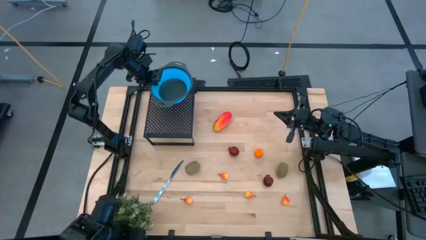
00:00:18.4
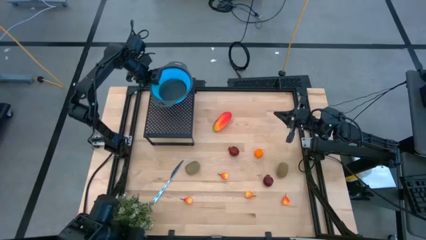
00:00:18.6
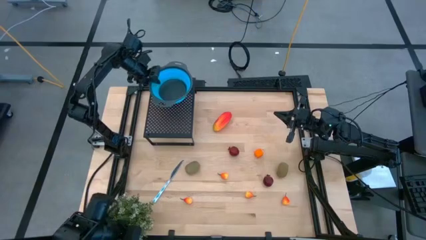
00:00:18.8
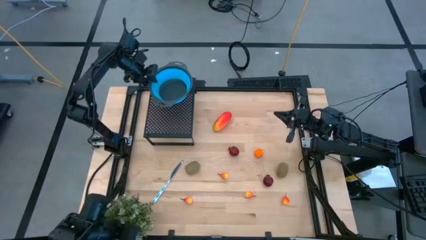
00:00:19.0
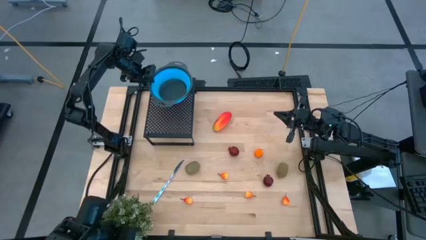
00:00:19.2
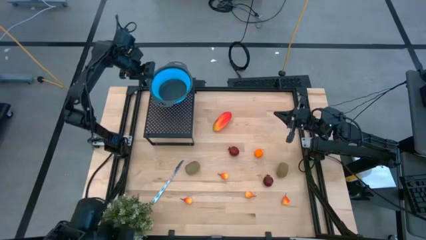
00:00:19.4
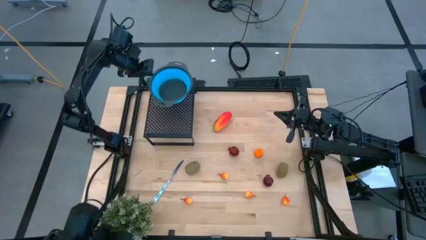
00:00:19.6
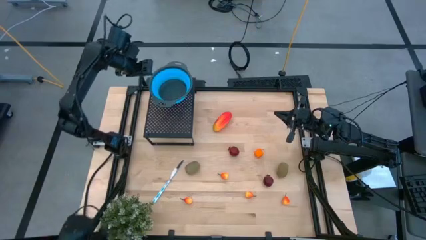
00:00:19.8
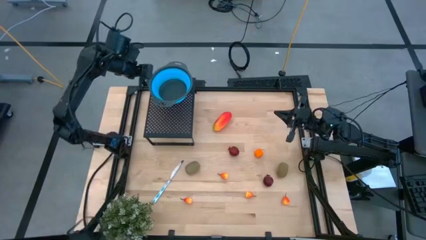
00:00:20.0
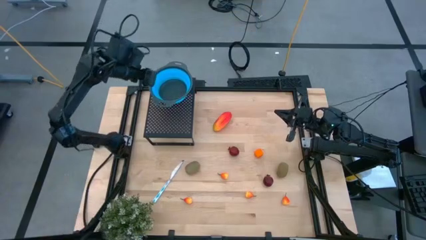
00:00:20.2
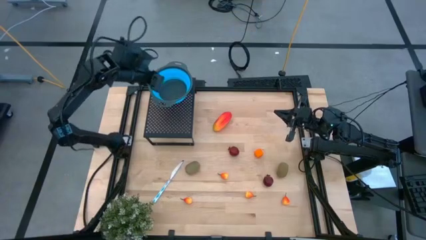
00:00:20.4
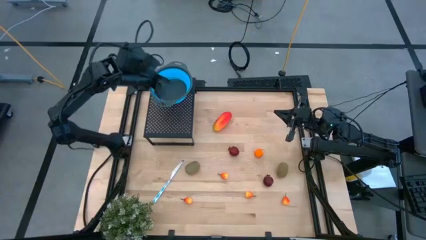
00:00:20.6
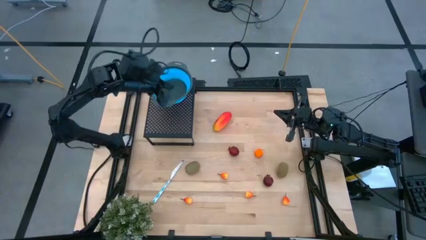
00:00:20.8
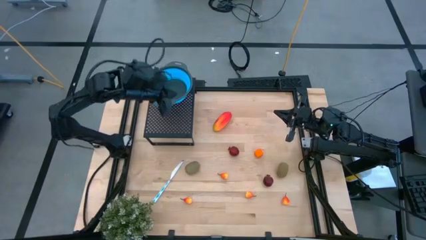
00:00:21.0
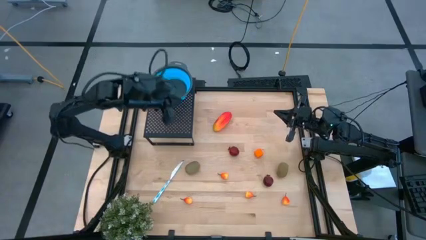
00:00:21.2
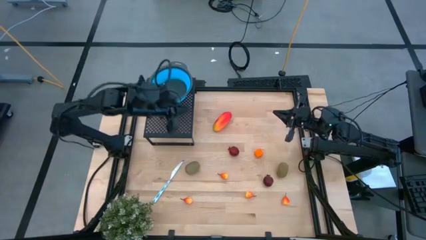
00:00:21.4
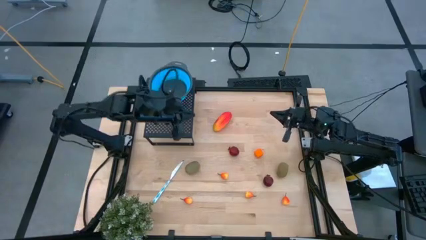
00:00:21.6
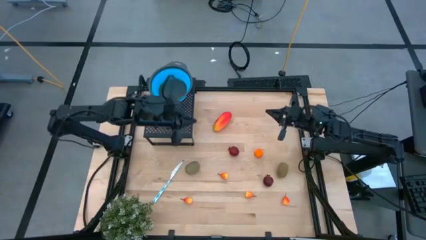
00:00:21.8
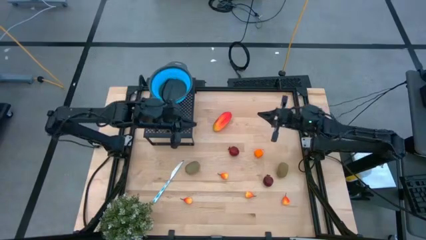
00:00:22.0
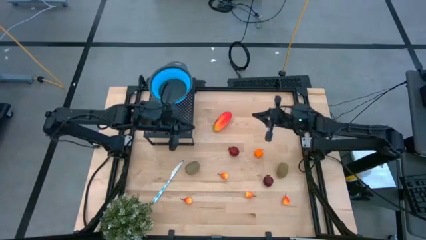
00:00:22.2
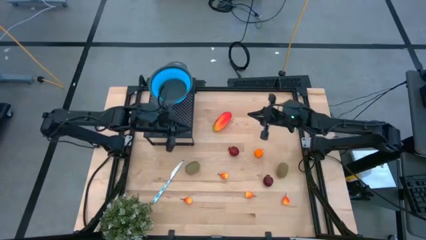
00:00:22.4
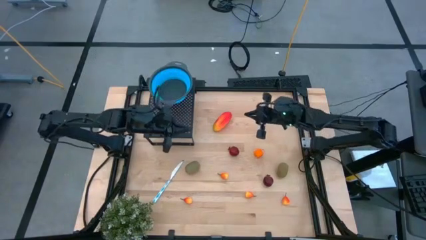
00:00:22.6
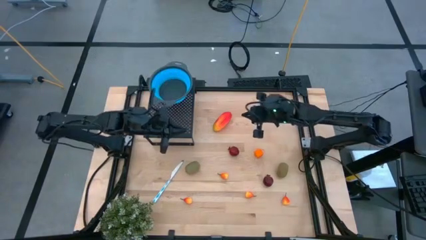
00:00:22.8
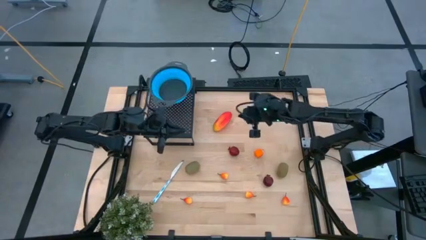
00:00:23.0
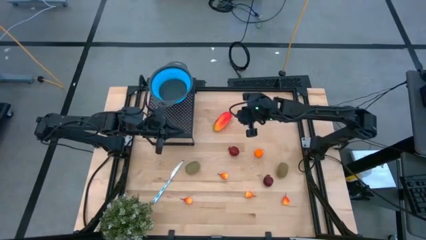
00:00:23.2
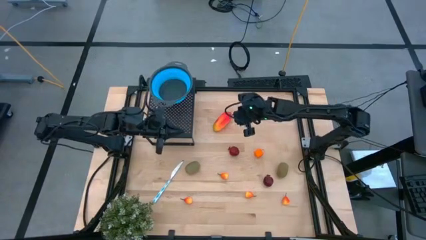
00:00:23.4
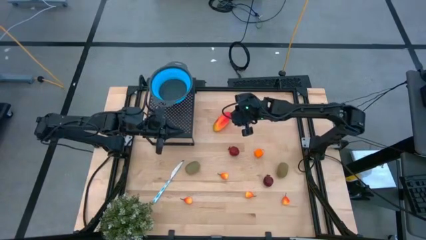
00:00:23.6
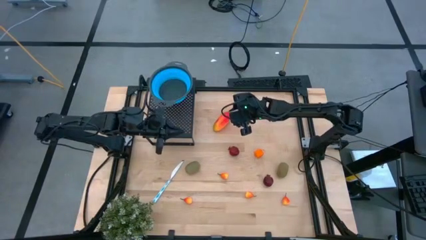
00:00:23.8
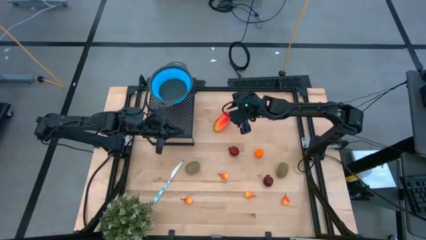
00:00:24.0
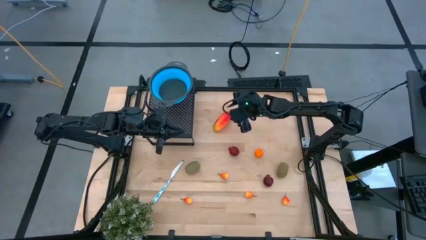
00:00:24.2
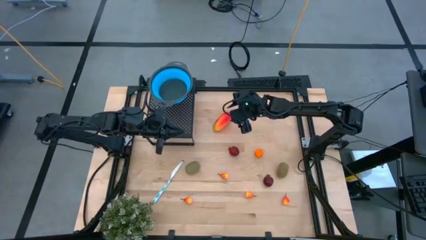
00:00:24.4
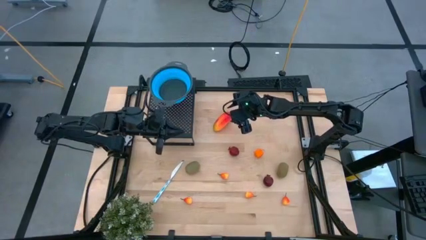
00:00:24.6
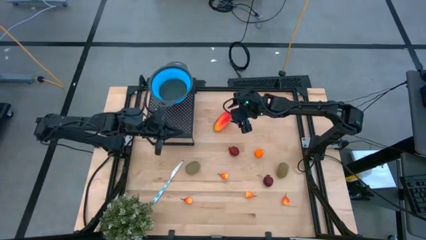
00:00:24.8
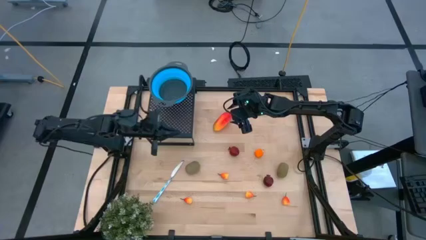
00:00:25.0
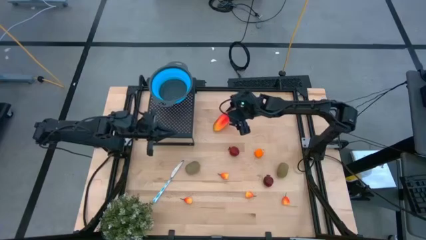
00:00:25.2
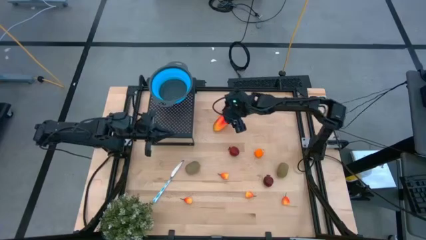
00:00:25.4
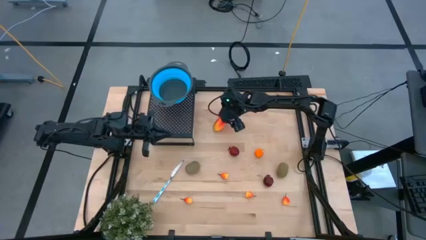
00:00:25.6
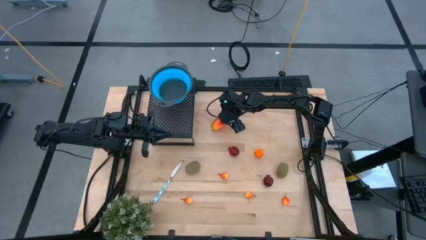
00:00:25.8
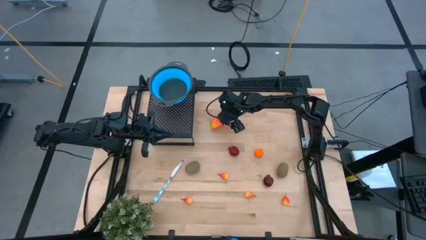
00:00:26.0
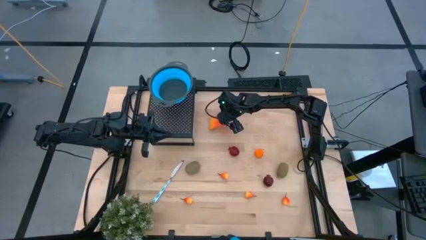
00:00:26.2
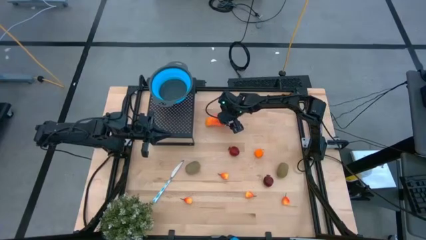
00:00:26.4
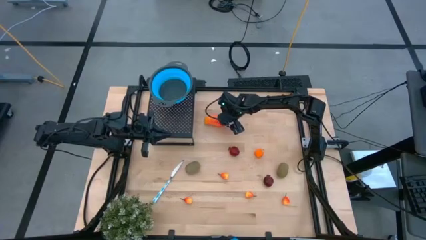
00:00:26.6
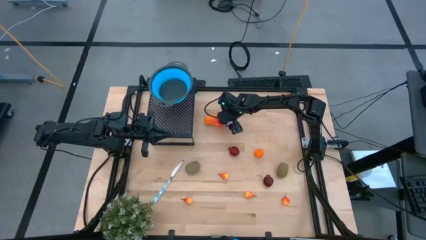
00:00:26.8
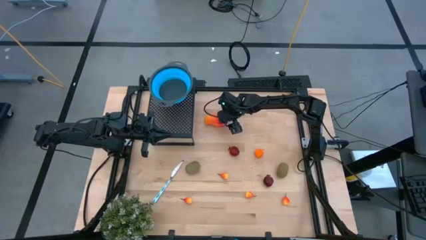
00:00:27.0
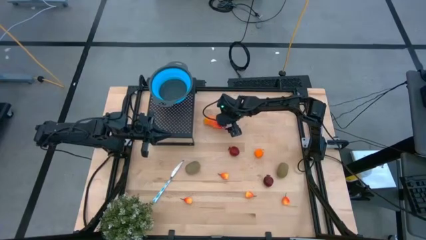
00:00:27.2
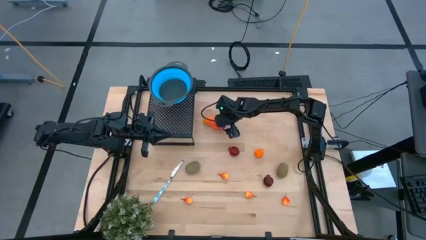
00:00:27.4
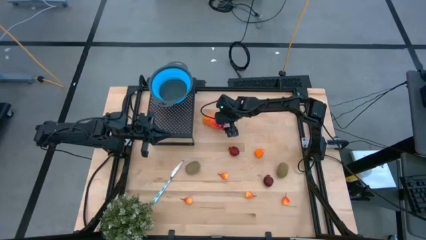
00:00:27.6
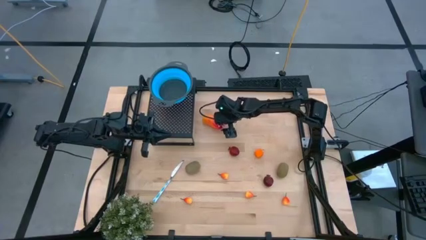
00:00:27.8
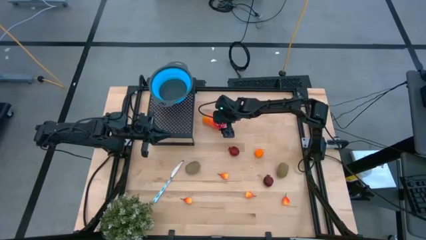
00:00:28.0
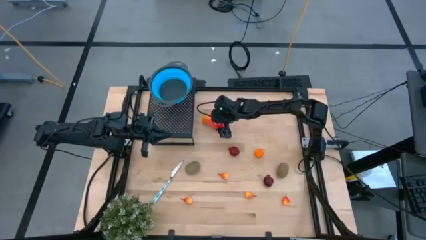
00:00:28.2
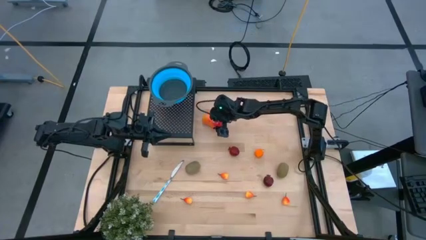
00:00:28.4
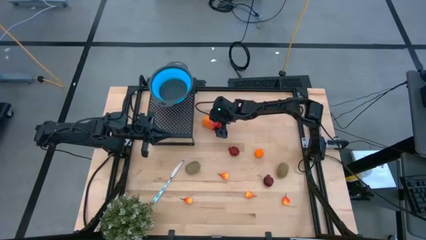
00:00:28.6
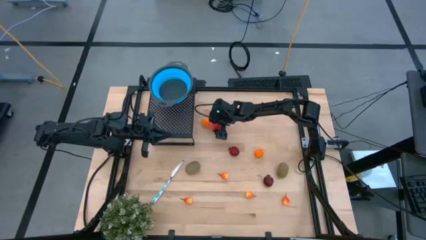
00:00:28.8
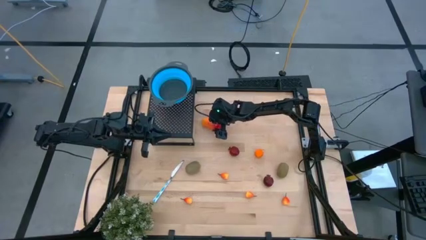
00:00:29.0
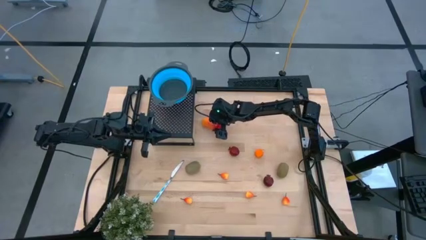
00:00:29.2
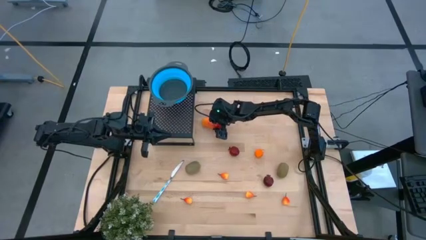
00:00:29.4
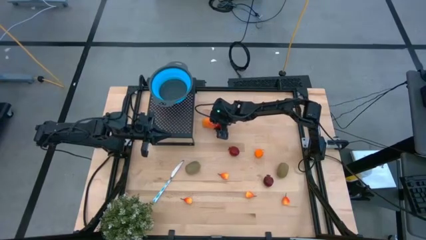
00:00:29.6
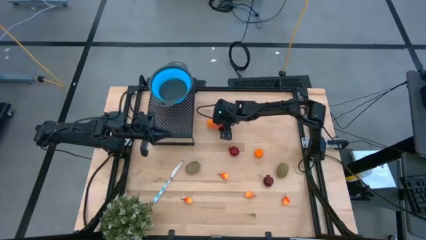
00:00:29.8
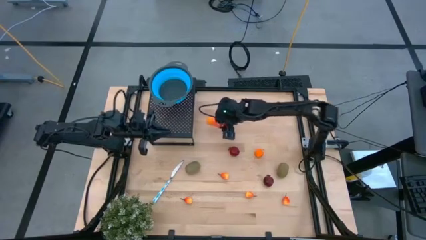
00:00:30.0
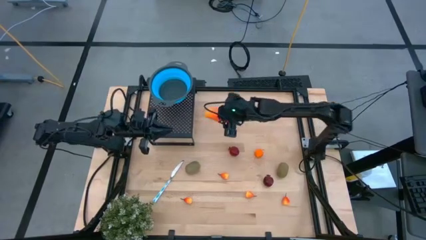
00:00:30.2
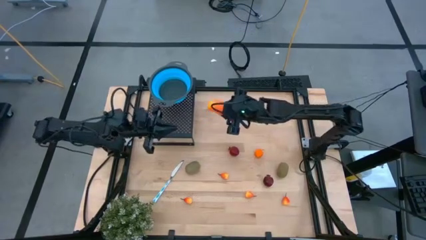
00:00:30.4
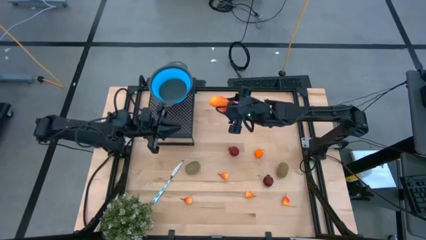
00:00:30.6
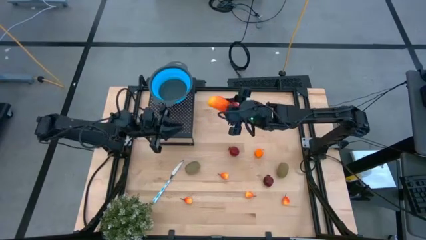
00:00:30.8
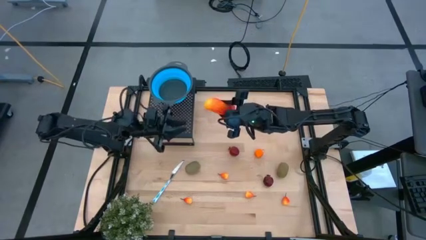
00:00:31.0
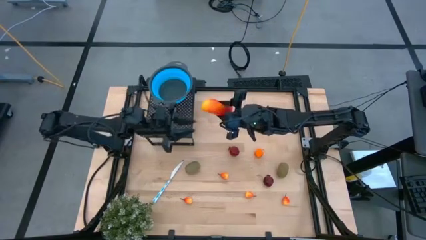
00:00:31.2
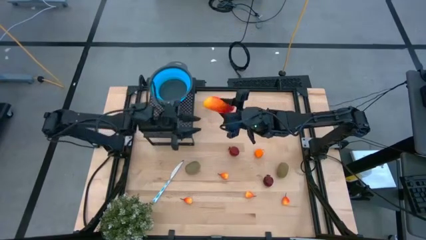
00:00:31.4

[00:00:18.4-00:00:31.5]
Task: Pick & Place Fruit
Put the red mango into the blue strainer bowl on the shelf

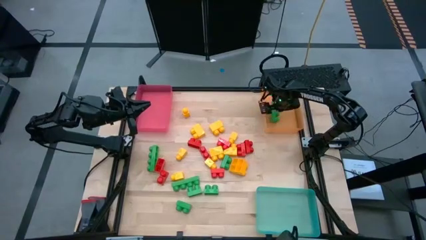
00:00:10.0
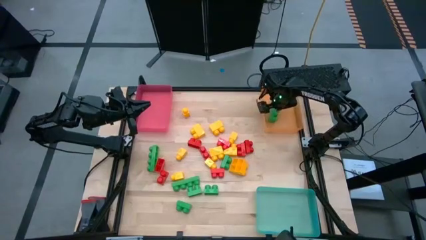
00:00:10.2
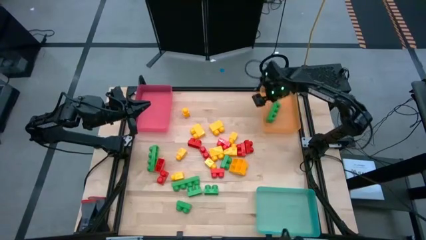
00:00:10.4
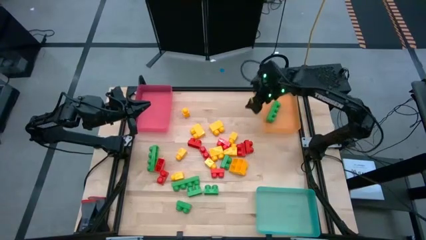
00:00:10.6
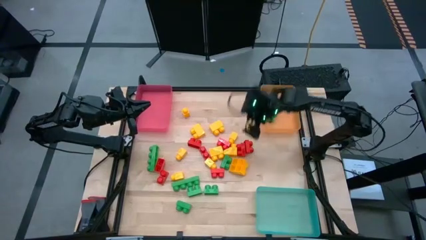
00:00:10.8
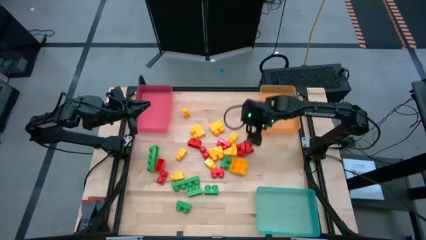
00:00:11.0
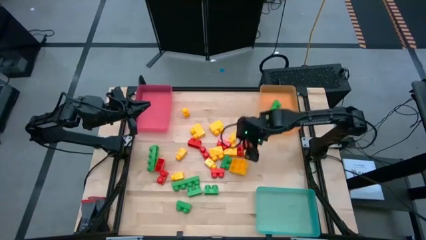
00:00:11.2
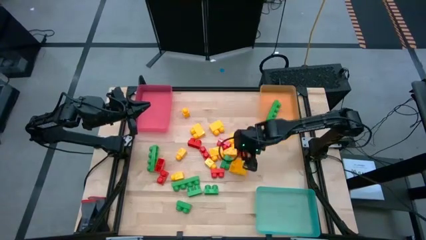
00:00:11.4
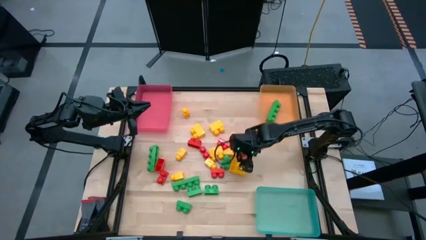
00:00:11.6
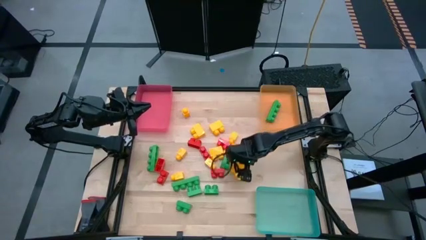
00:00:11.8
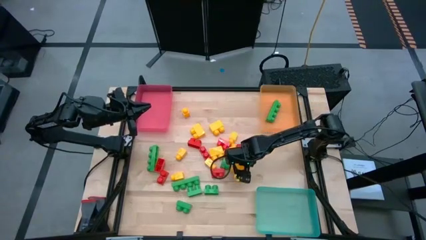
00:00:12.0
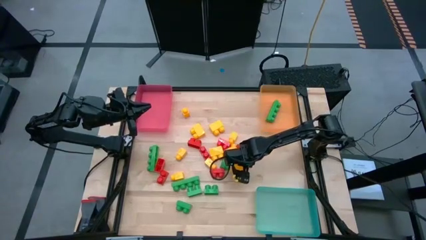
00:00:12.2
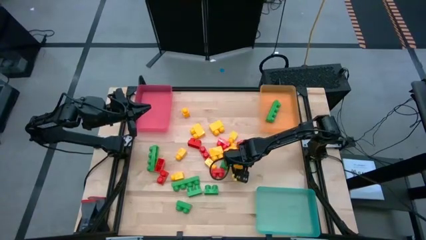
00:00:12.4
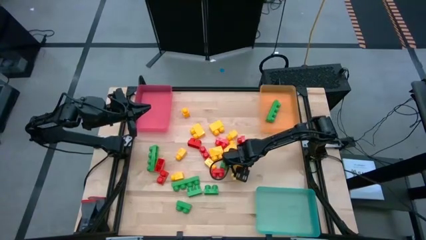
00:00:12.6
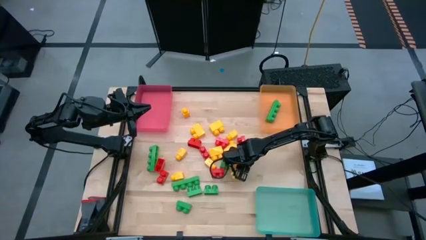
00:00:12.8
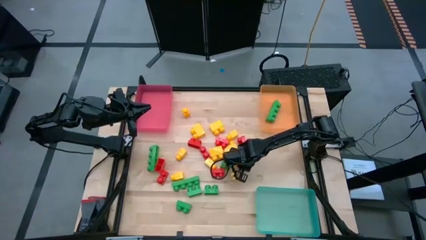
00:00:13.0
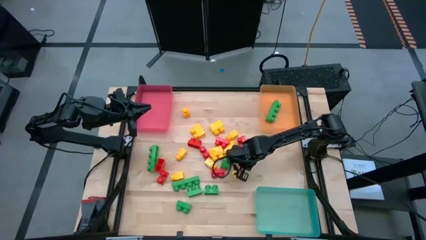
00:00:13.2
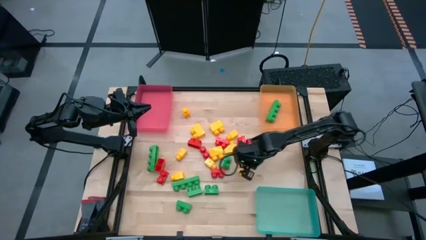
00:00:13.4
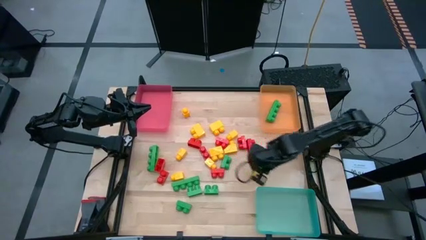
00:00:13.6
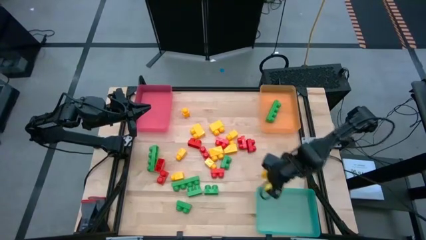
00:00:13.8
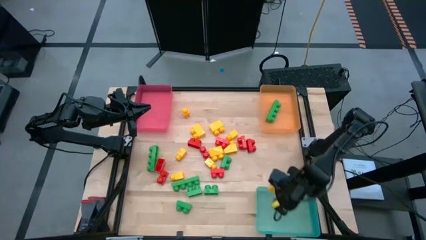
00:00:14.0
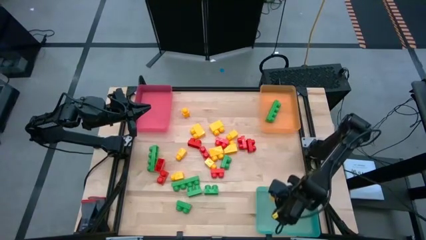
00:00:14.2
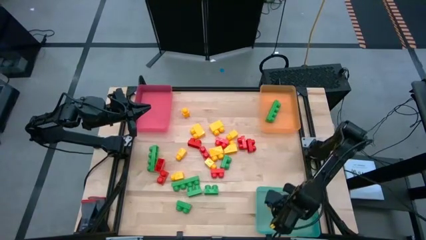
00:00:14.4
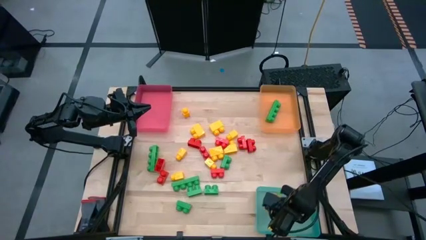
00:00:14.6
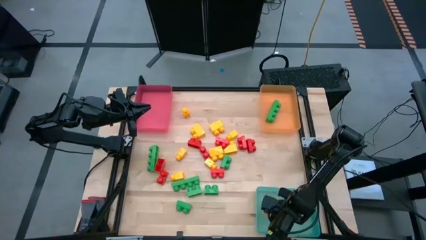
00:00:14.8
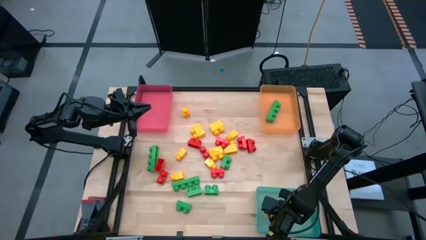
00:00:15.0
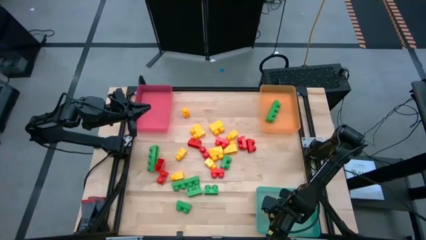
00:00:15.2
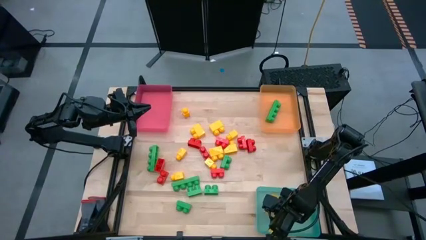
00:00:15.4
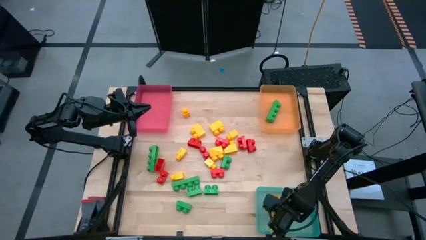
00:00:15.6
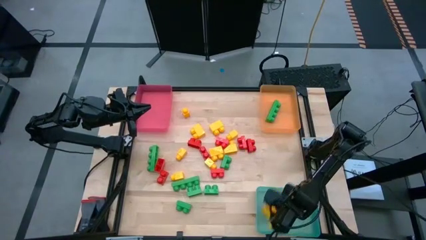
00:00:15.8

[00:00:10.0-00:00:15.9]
Task: Sort blocks
Put the yellow game piece into the blue bin
